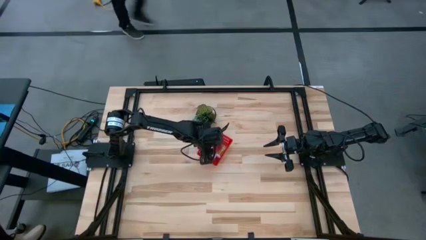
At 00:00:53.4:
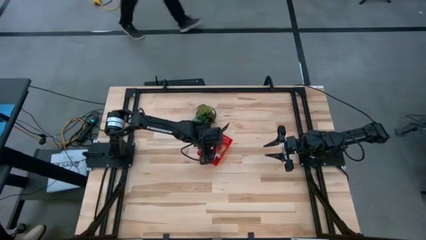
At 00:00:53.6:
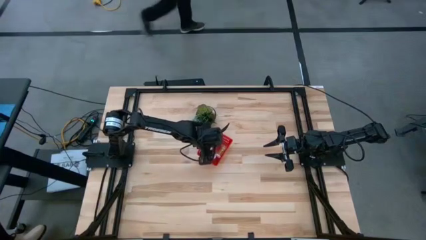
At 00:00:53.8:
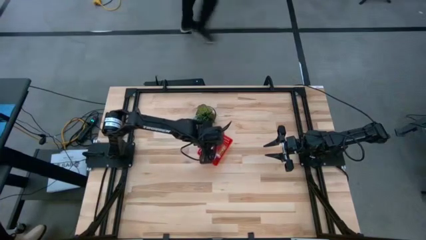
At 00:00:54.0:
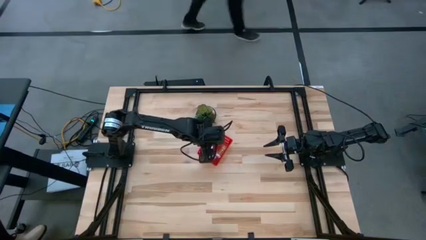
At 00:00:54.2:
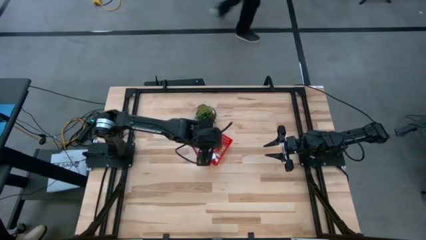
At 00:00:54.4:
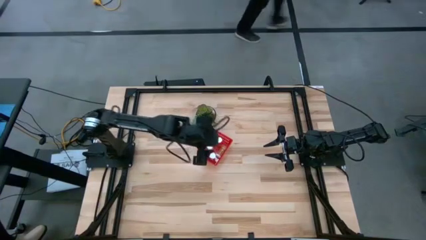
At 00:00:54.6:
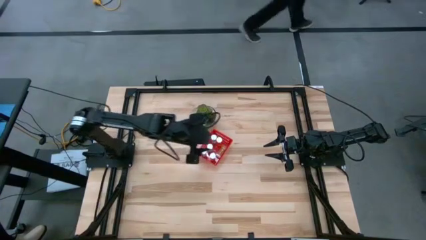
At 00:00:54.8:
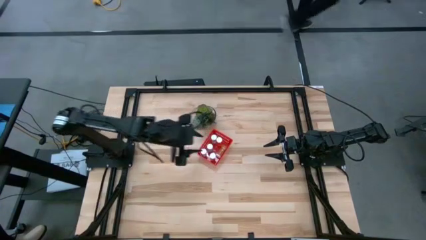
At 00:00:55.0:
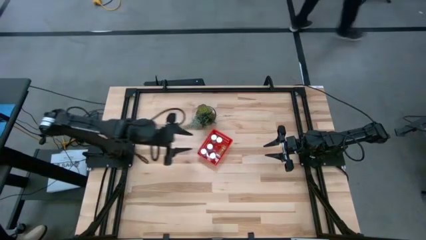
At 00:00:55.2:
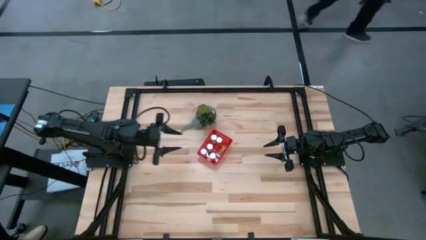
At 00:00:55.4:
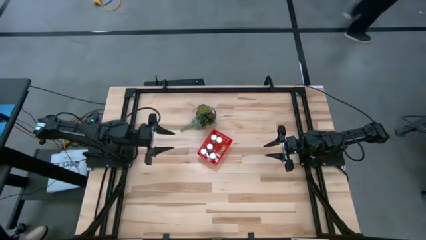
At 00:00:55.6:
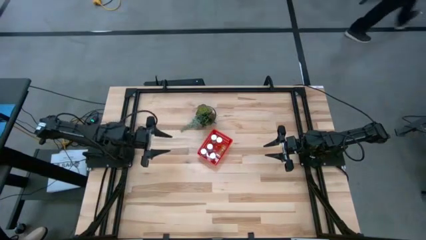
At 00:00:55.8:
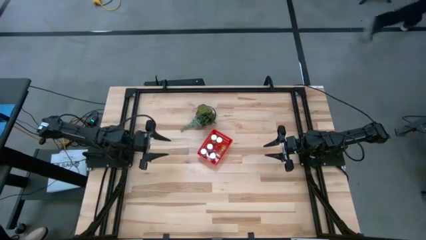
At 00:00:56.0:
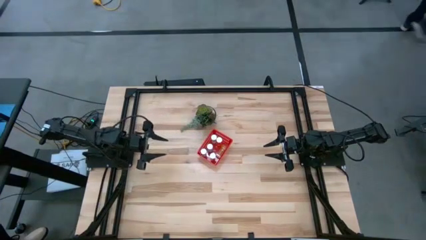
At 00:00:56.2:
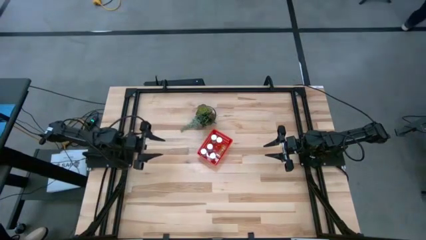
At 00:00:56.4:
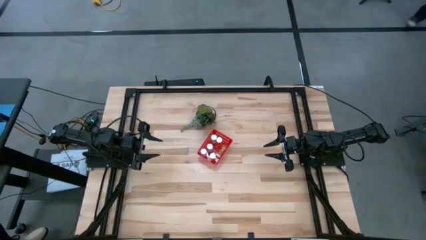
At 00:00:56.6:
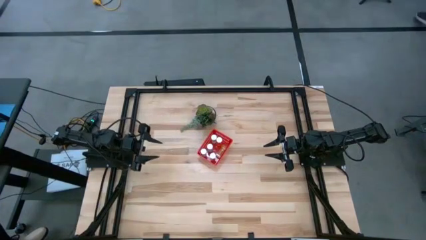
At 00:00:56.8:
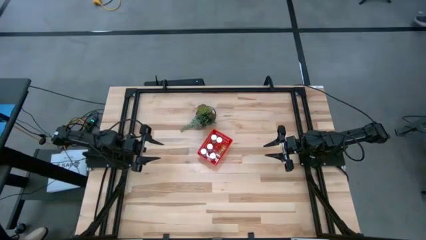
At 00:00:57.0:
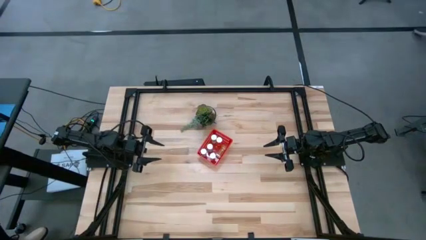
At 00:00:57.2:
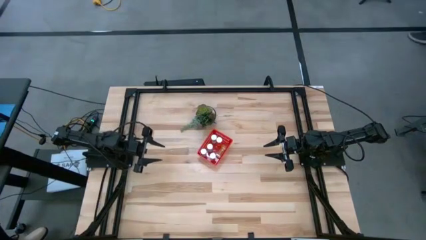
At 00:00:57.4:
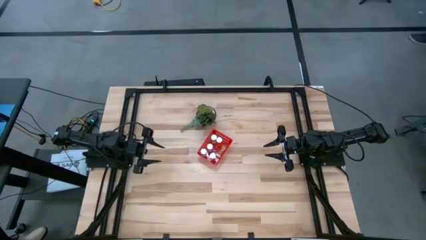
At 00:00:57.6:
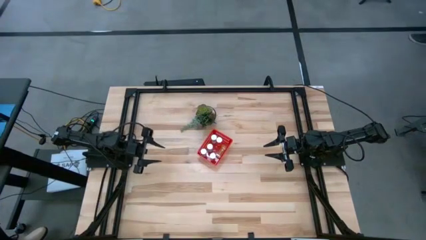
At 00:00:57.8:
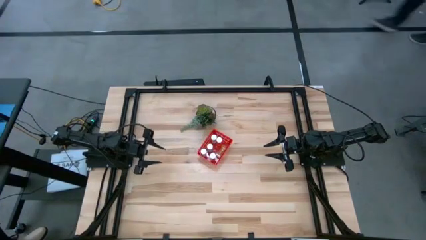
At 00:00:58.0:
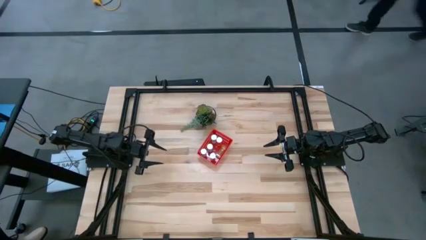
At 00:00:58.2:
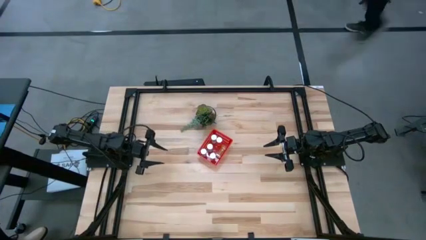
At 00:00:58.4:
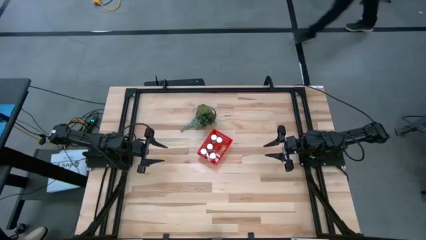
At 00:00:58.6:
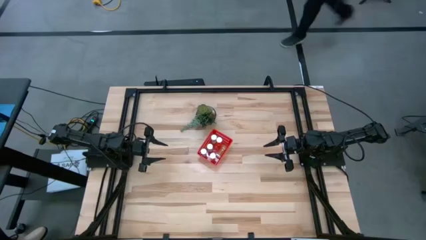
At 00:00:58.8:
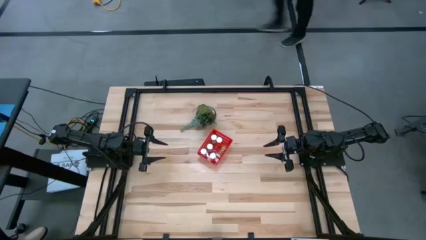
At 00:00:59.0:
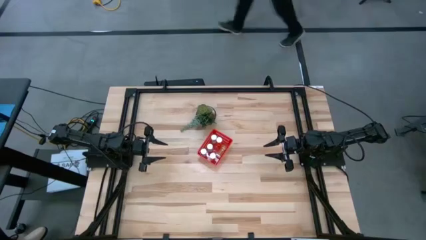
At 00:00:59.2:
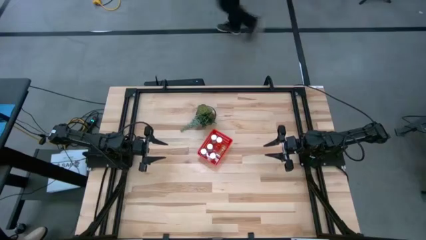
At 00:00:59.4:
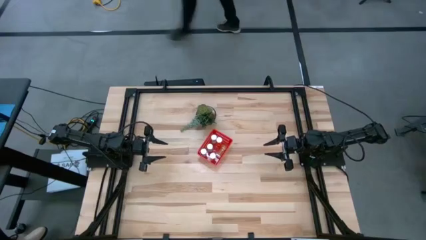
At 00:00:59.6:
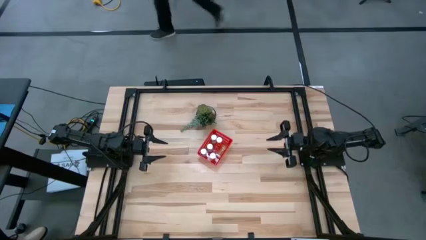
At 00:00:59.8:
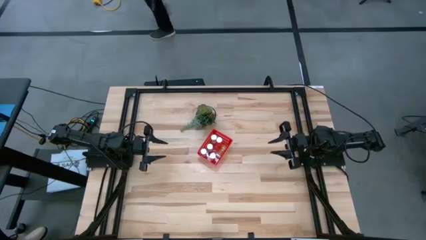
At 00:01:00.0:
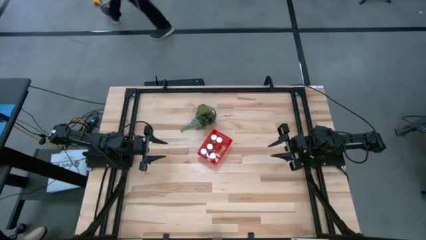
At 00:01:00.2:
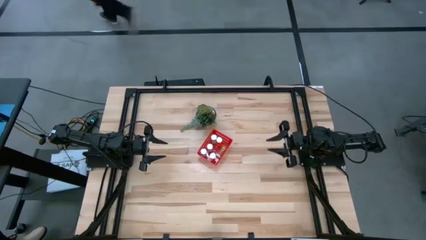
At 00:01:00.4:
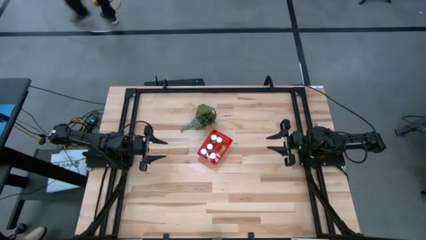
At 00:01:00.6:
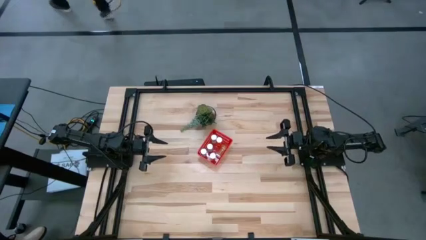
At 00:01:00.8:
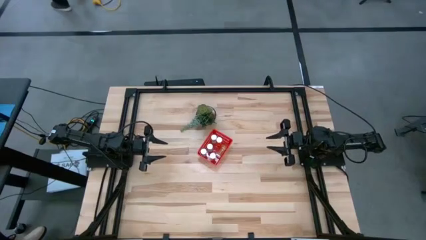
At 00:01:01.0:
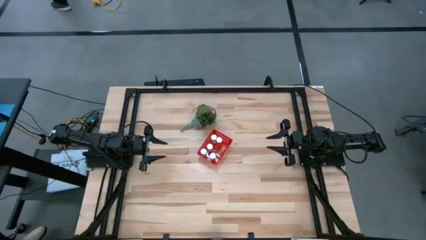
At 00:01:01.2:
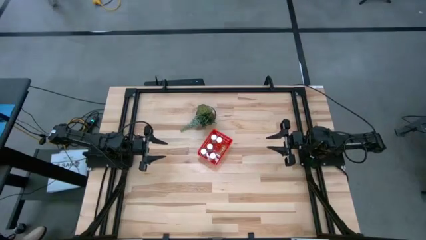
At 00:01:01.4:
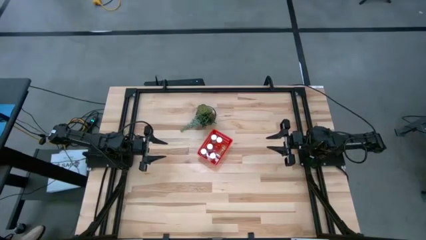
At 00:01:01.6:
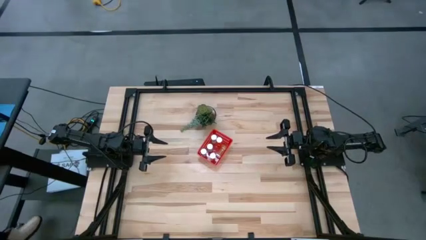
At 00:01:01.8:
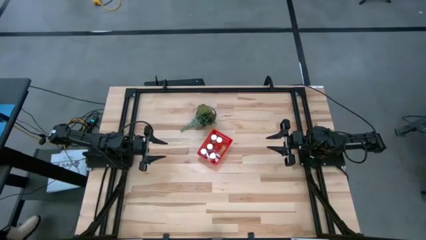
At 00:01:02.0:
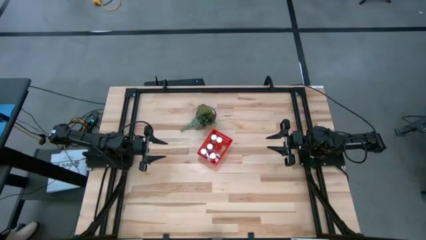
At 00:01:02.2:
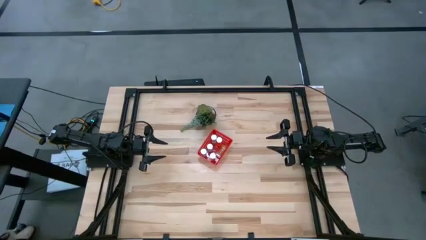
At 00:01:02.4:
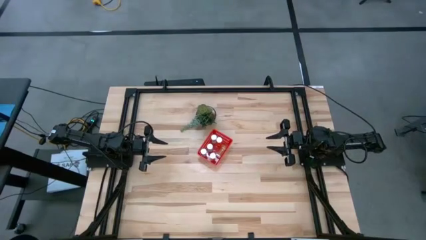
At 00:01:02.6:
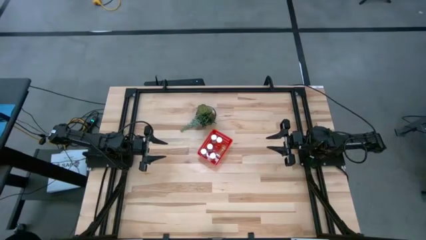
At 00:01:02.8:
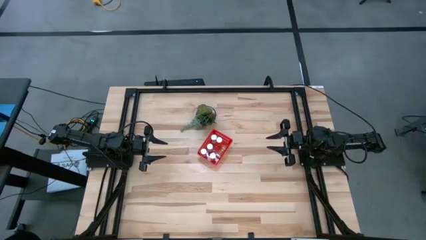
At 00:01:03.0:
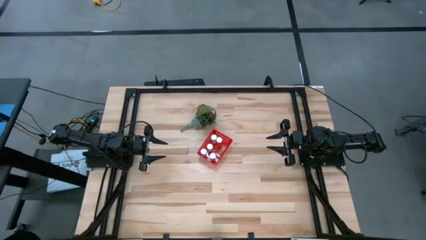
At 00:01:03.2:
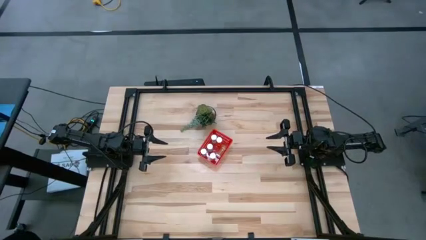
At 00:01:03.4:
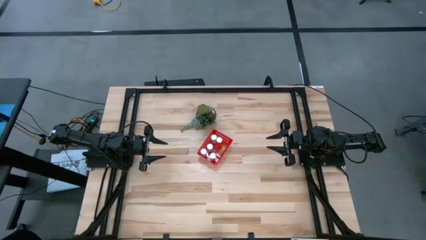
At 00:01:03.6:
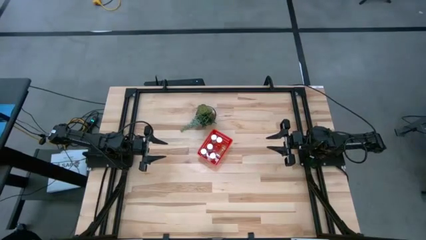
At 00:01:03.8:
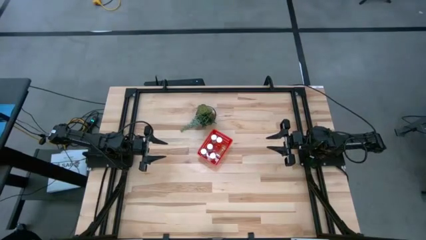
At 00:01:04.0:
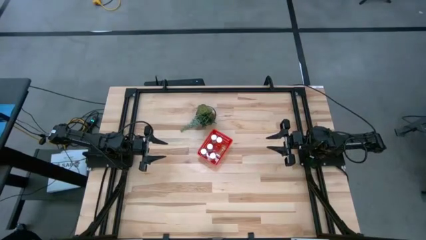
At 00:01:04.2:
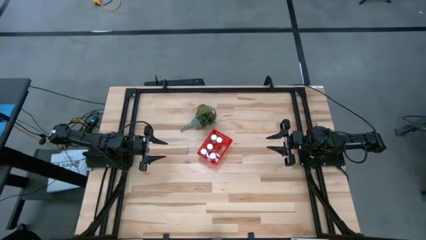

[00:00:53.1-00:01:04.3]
Task: Pick and place pill bottles into a basket
Return to Home Position
